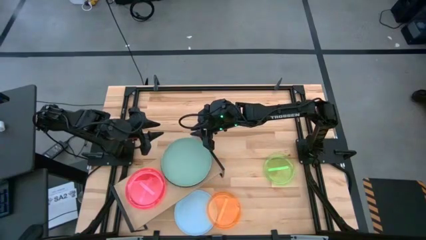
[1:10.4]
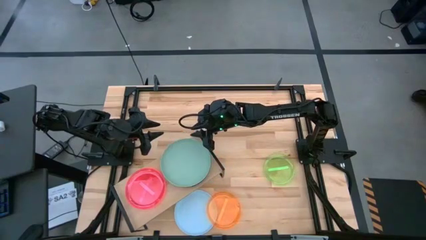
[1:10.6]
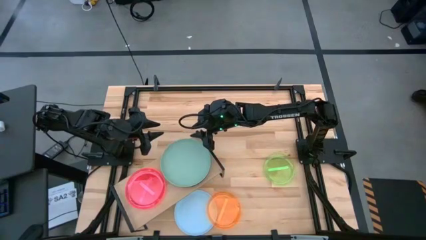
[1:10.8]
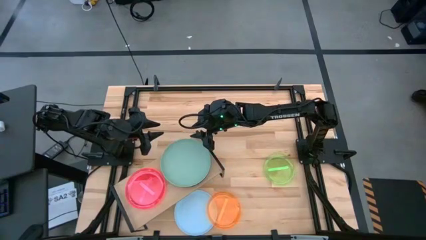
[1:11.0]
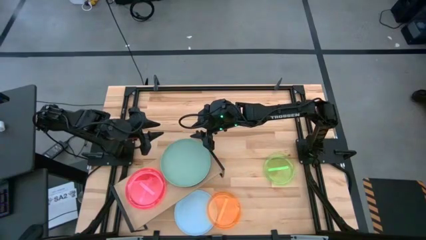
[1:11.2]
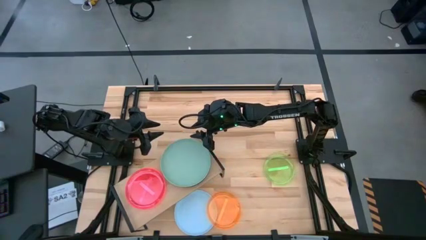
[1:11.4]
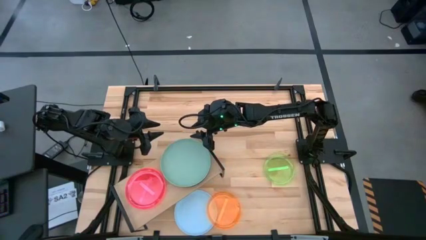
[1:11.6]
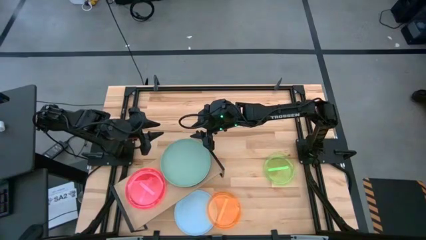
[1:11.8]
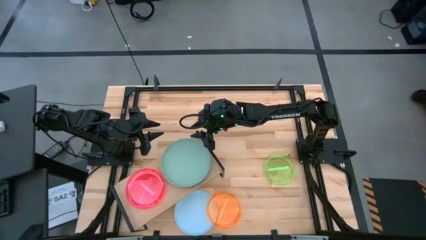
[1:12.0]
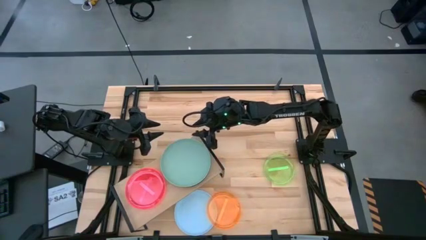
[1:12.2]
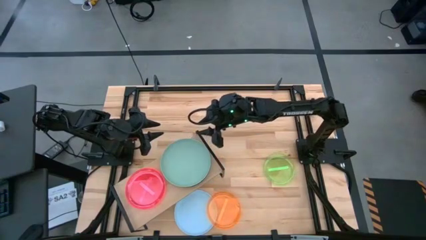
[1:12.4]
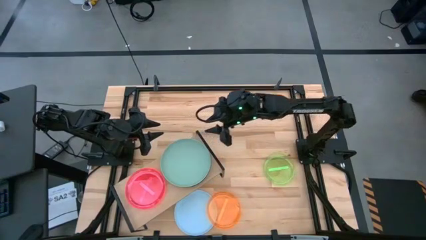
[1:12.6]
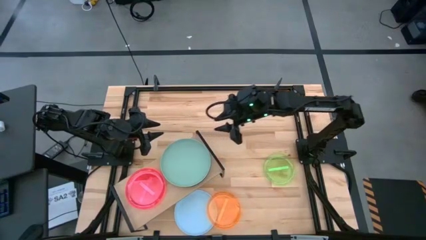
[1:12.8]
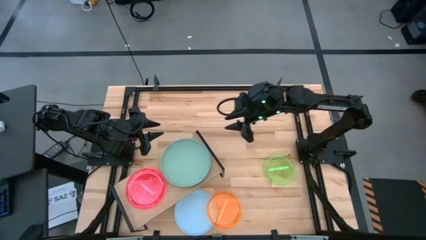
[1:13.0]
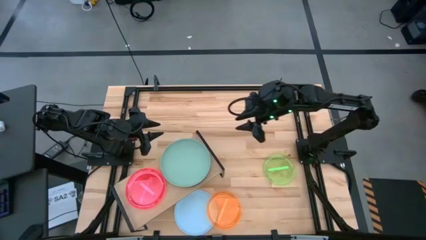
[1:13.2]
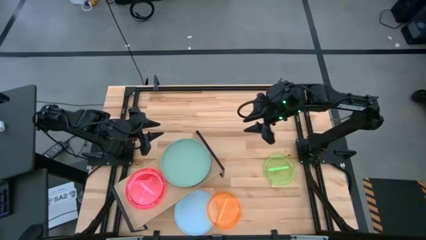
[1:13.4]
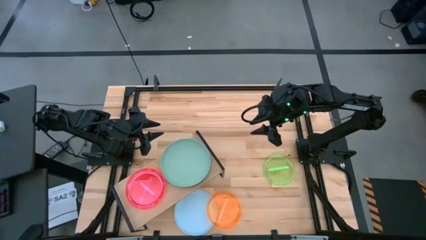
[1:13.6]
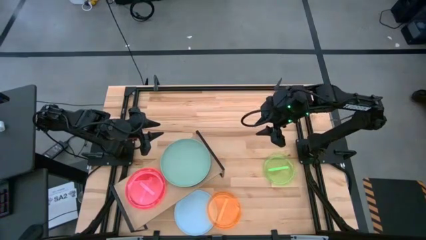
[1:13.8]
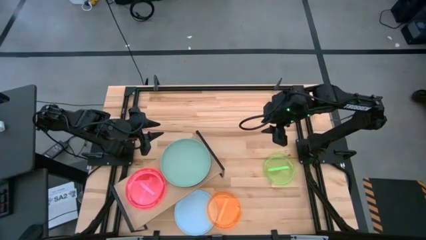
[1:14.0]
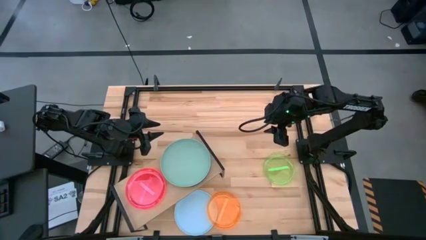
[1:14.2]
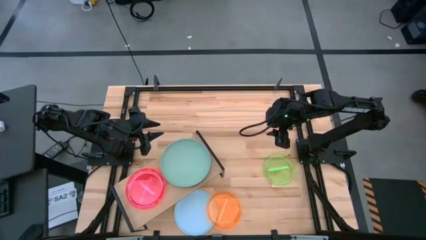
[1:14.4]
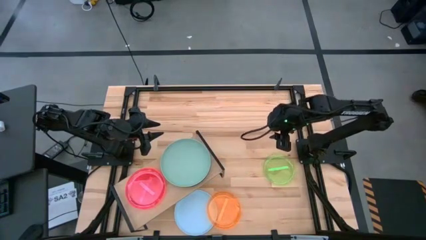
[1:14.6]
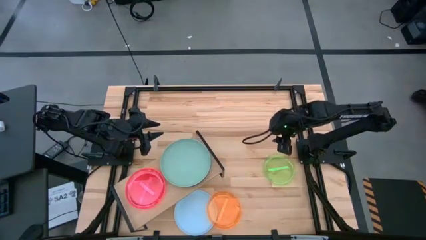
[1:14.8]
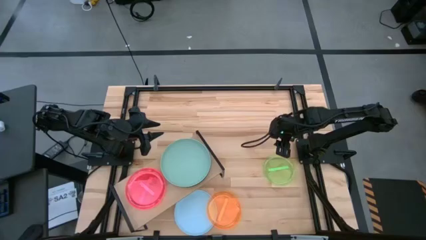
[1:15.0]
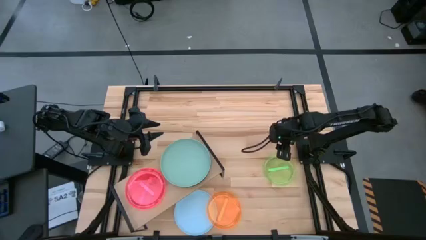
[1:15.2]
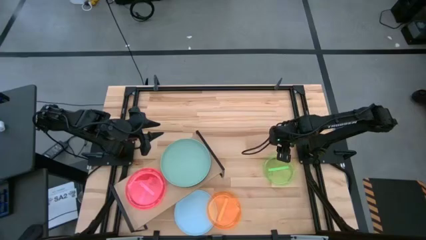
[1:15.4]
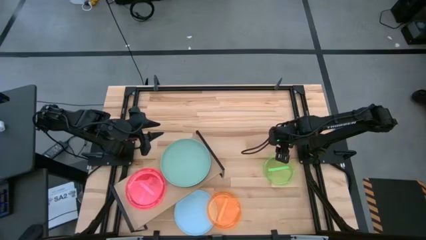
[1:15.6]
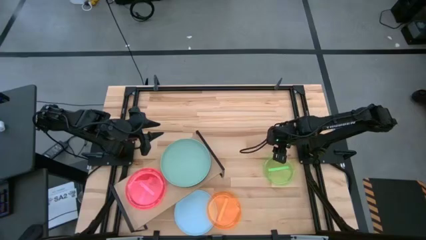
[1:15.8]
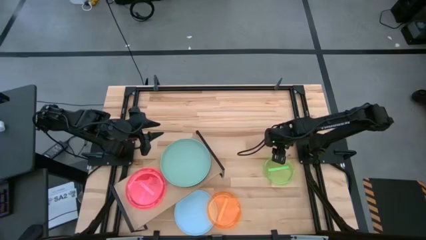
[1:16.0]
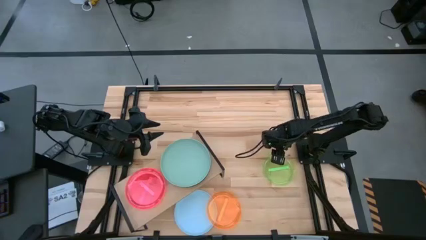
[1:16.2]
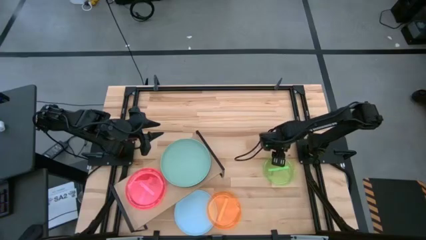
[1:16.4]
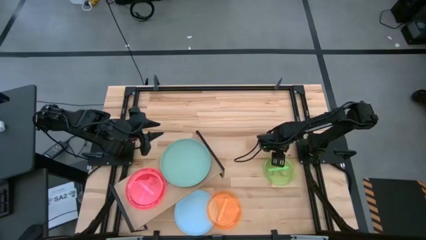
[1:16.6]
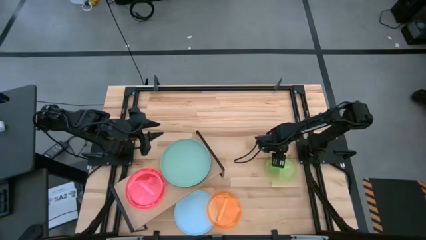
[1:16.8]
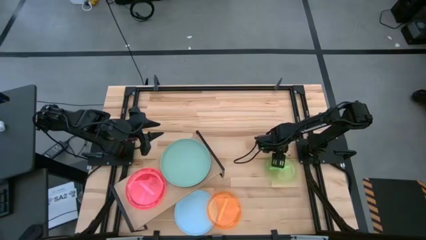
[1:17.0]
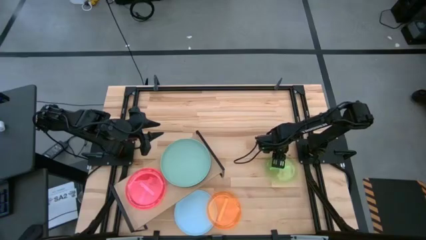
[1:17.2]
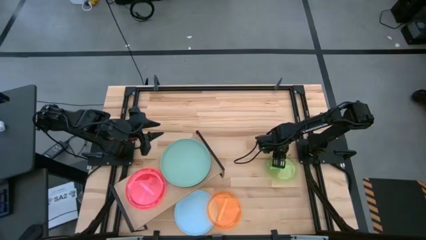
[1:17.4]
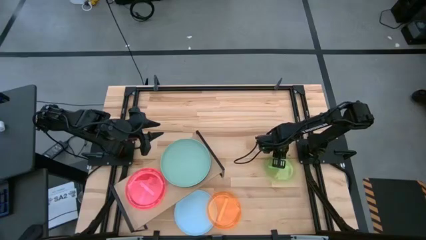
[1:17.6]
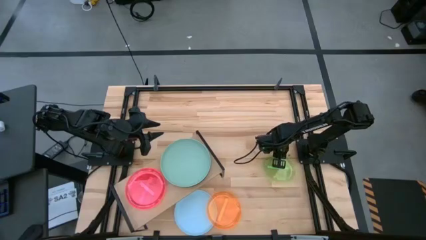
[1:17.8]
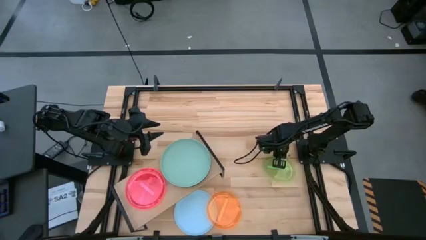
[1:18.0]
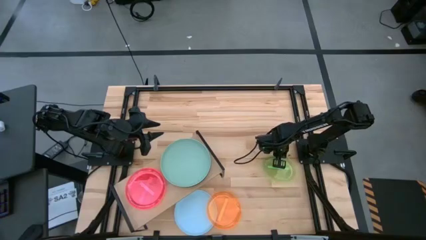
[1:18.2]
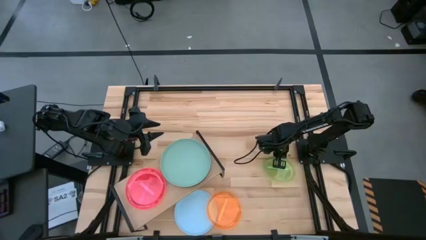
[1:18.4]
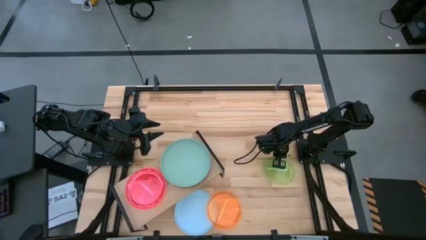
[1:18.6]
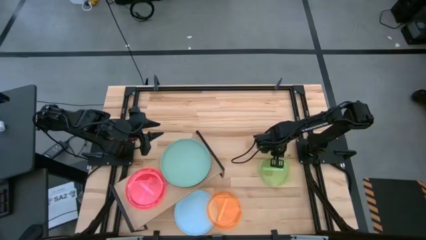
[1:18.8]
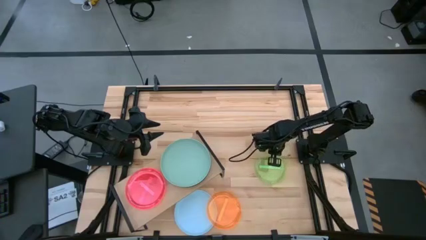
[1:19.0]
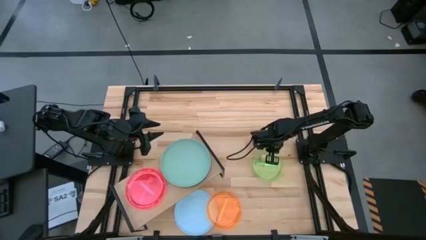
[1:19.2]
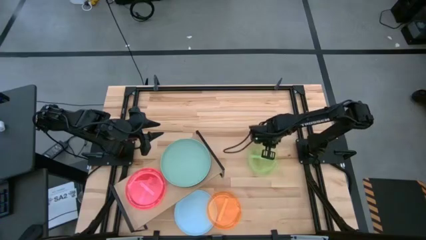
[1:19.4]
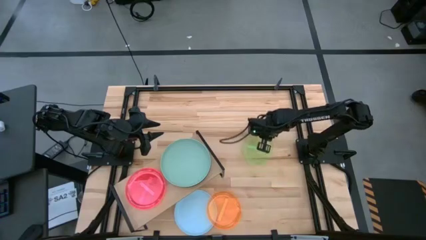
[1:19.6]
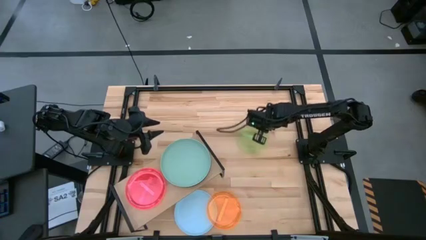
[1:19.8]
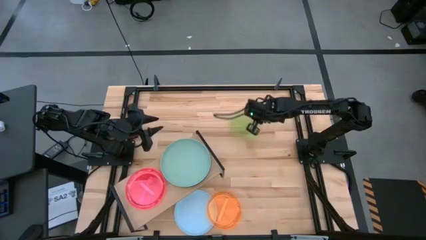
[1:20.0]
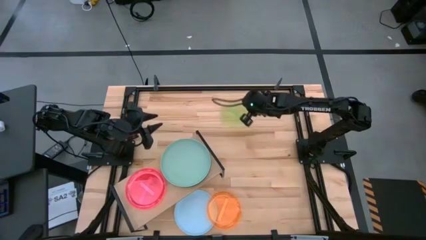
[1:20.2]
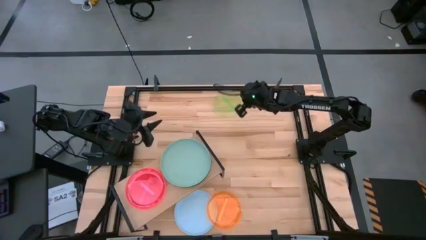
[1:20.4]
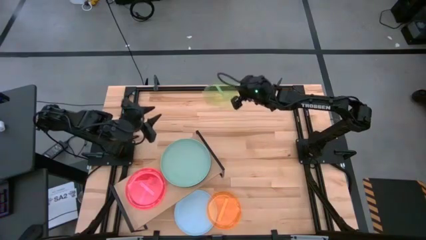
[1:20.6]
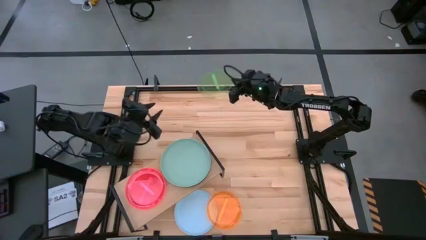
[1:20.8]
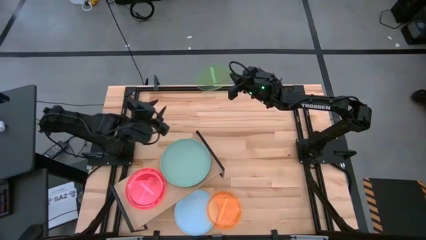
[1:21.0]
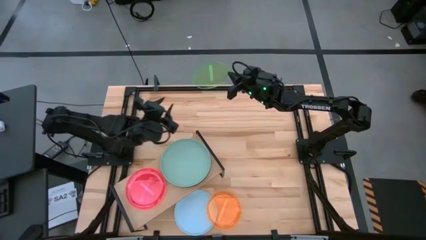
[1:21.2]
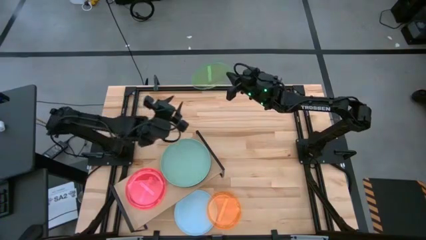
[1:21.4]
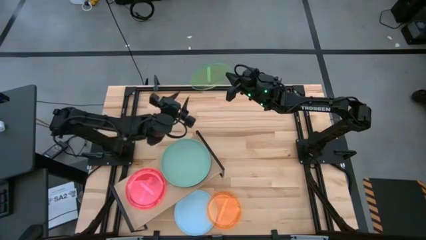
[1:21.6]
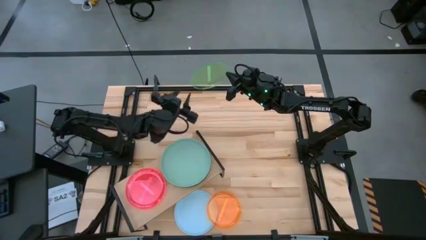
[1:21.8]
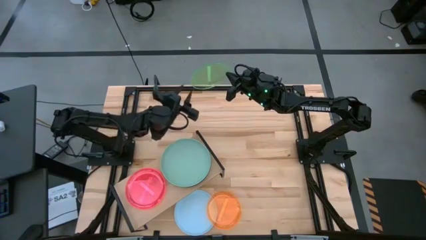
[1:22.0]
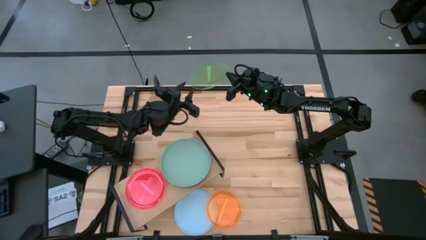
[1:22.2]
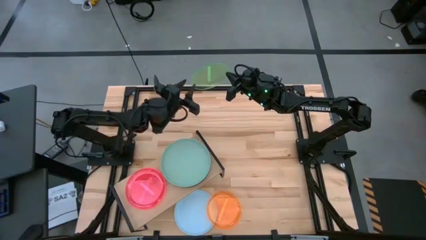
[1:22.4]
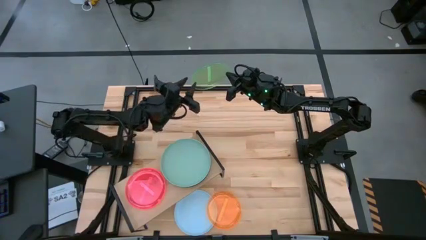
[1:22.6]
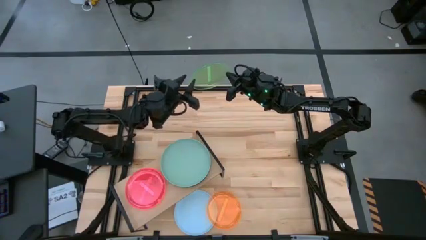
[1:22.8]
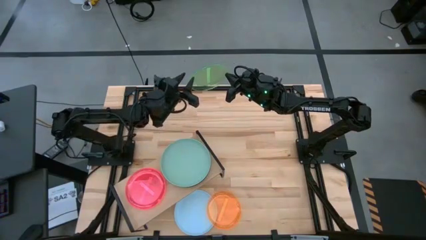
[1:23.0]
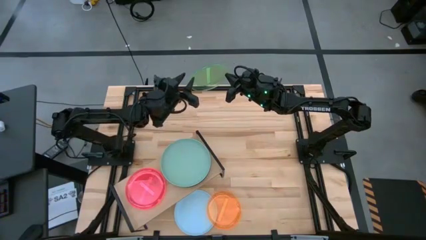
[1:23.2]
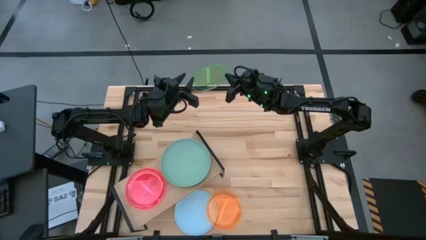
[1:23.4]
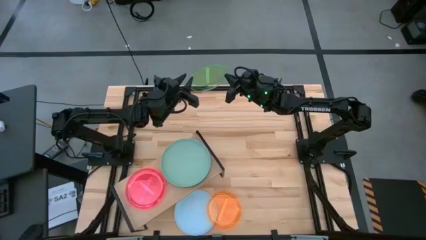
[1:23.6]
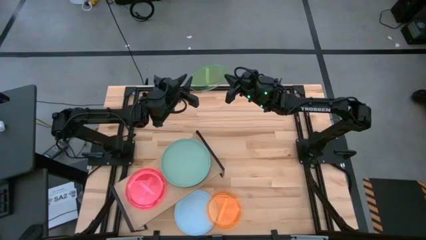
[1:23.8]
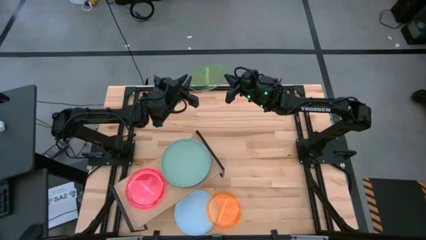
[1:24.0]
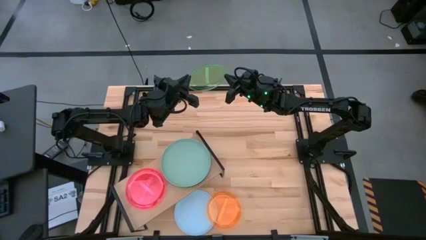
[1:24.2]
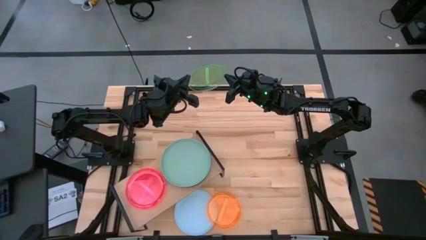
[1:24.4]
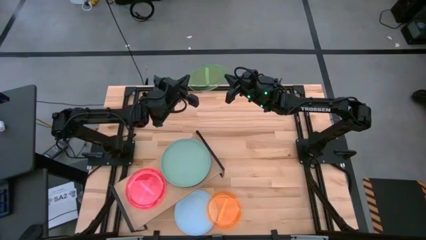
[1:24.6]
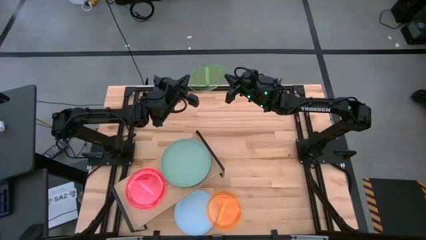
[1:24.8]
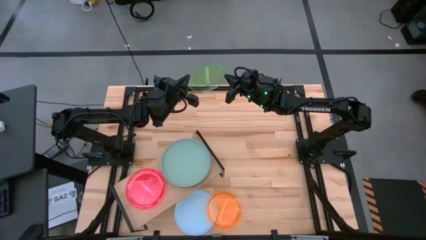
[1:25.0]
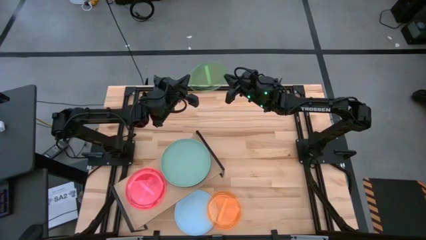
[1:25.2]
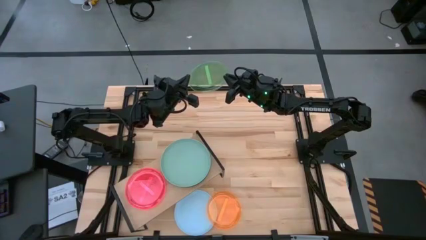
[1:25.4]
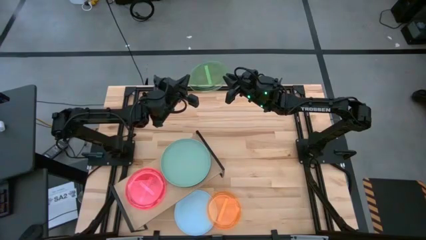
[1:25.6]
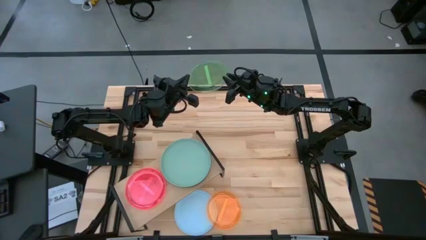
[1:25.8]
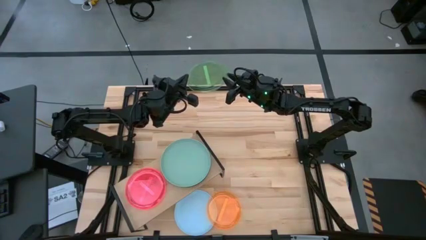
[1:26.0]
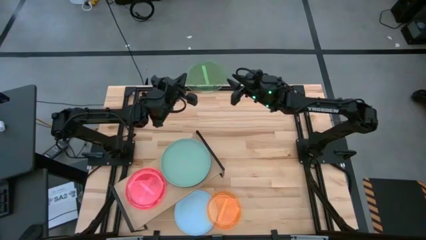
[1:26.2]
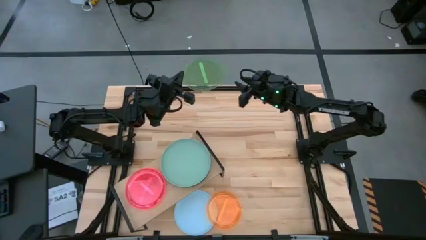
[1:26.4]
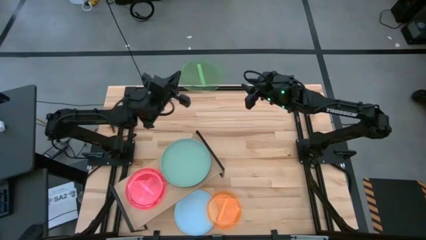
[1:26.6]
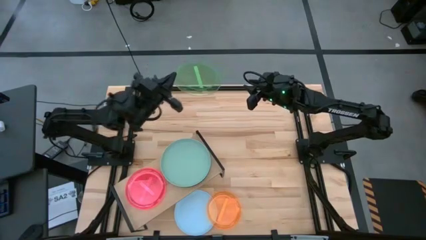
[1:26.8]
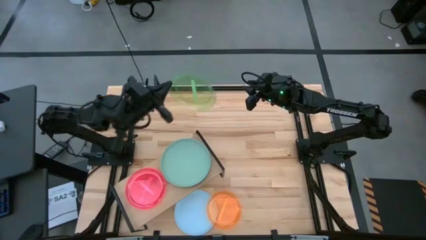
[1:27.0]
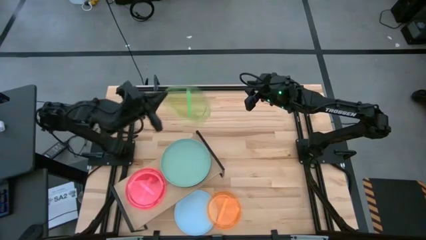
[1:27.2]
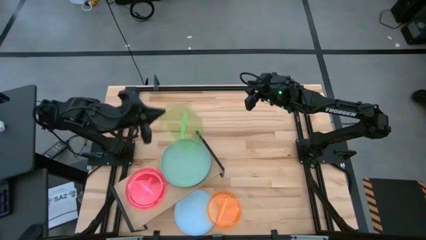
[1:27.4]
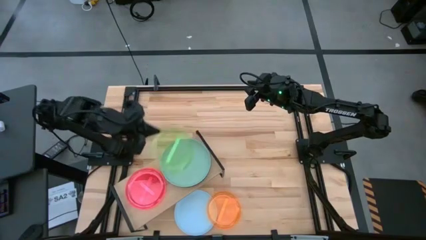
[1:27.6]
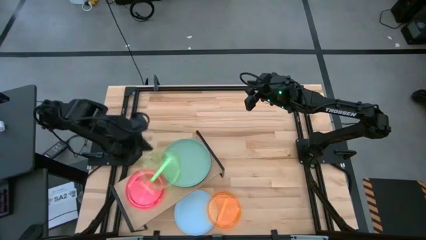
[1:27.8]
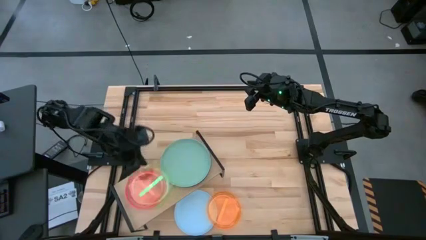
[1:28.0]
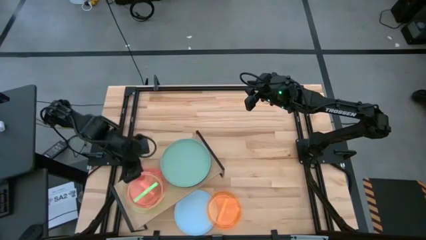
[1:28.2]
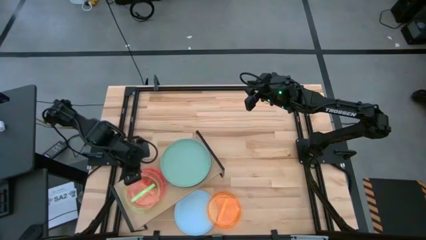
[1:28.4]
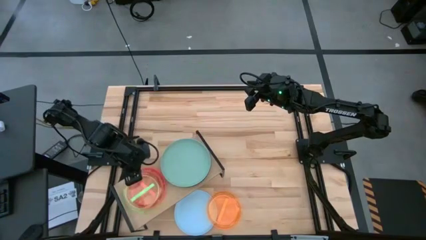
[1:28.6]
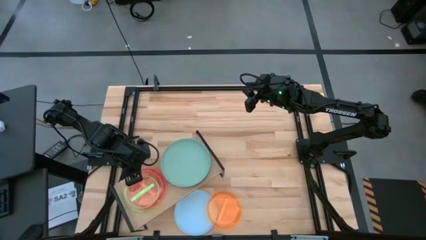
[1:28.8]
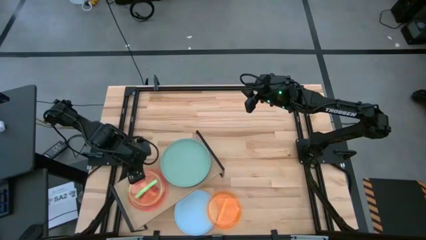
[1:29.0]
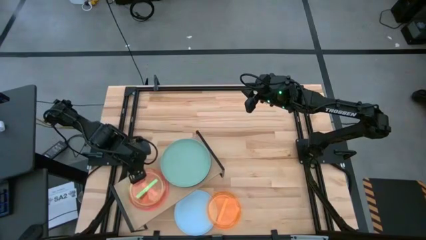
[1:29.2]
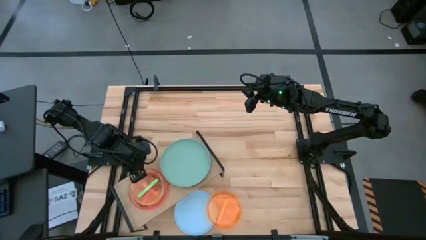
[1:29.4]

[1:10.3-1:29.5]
Task: Place and stack plates onto a shelf
Stack the green plate on top of the pink plate on the shelf
